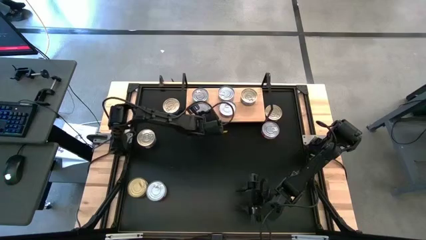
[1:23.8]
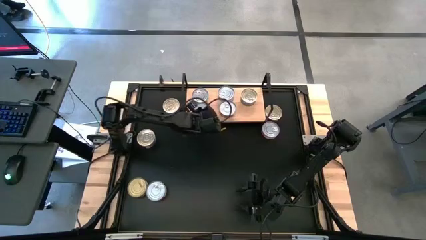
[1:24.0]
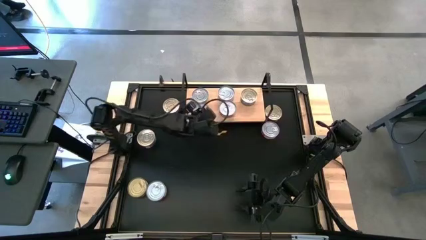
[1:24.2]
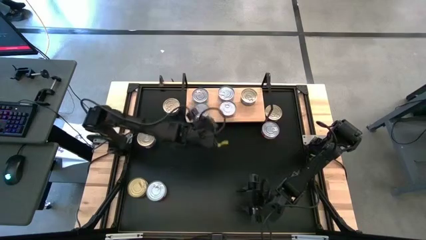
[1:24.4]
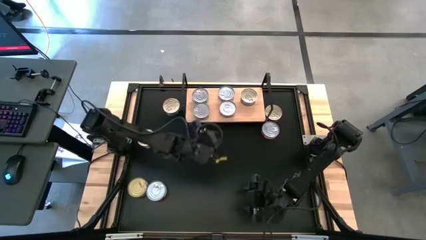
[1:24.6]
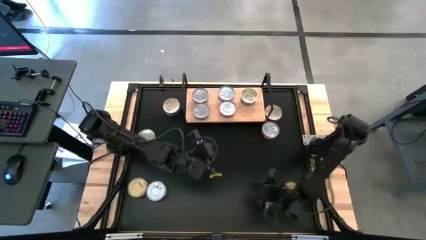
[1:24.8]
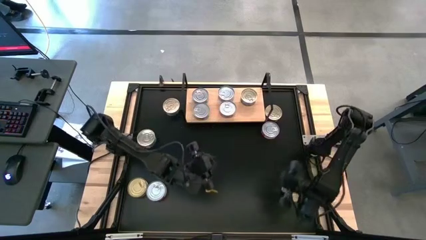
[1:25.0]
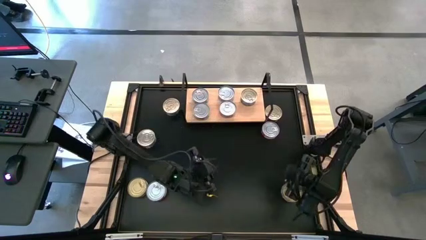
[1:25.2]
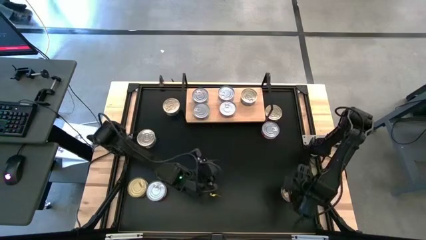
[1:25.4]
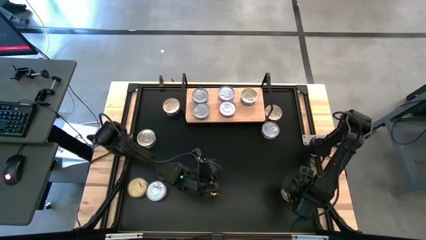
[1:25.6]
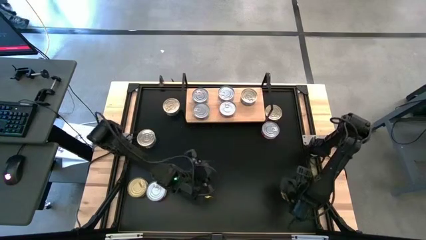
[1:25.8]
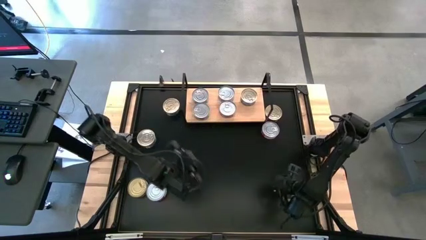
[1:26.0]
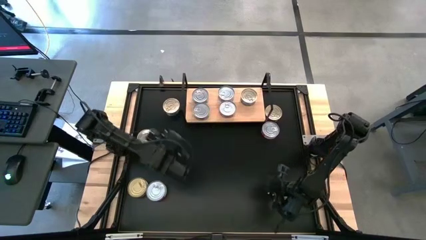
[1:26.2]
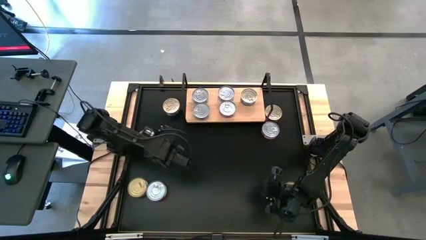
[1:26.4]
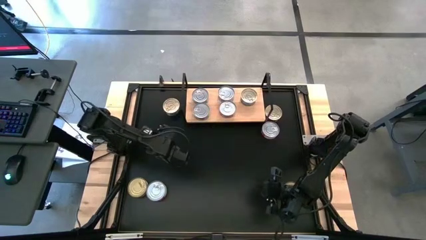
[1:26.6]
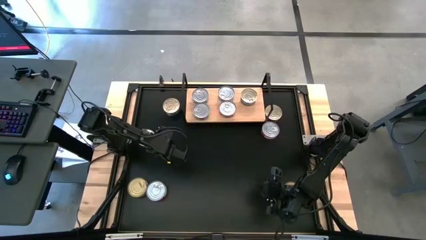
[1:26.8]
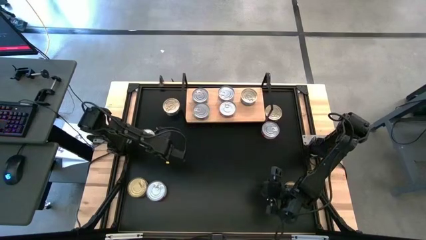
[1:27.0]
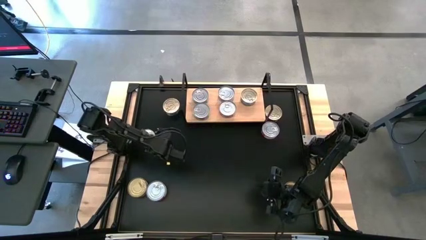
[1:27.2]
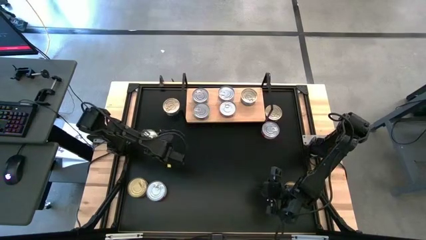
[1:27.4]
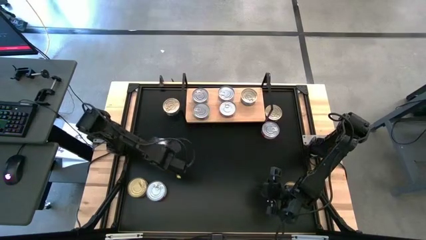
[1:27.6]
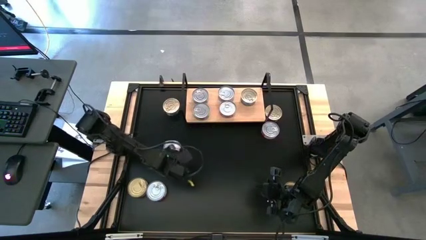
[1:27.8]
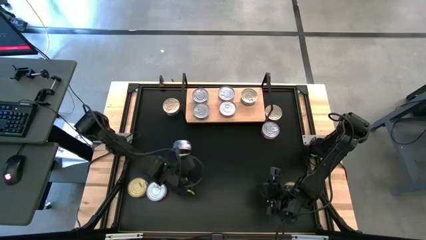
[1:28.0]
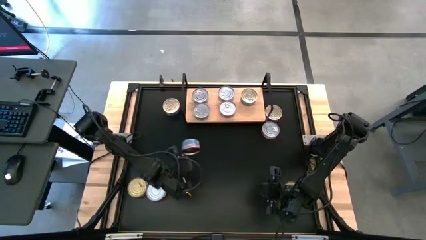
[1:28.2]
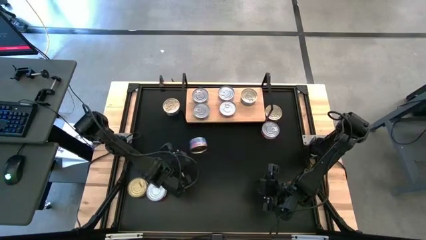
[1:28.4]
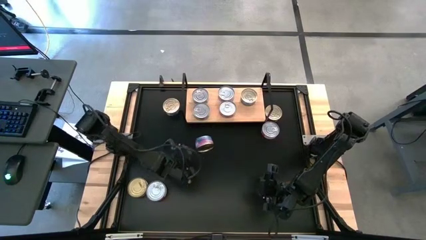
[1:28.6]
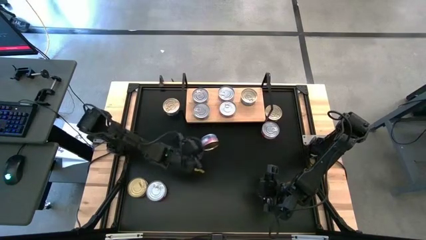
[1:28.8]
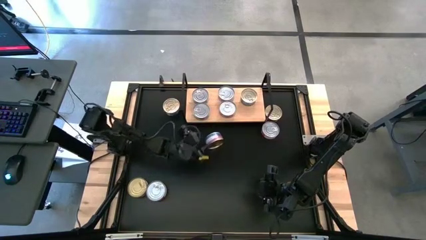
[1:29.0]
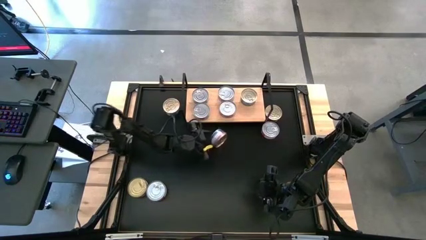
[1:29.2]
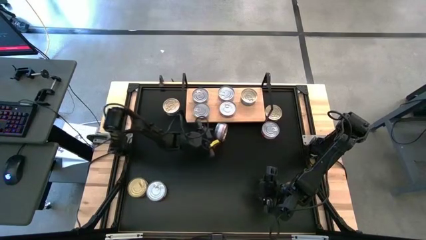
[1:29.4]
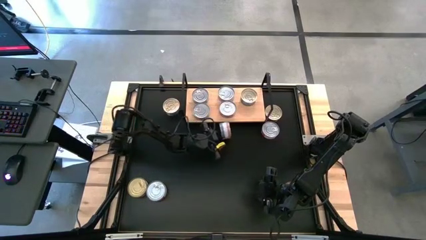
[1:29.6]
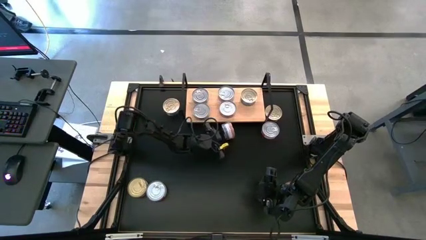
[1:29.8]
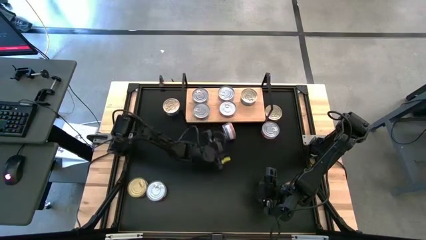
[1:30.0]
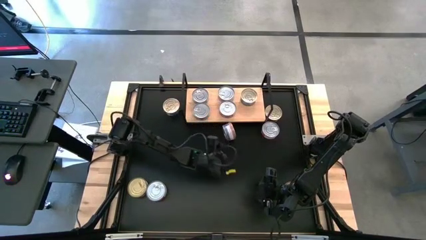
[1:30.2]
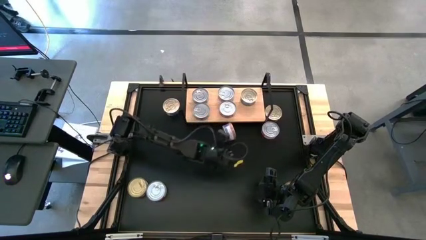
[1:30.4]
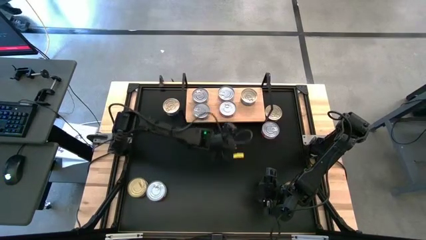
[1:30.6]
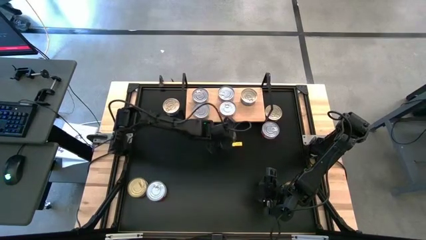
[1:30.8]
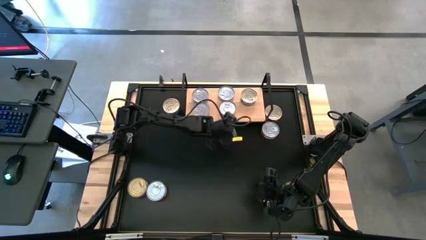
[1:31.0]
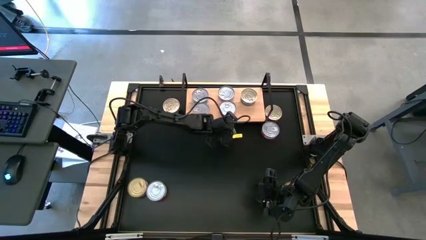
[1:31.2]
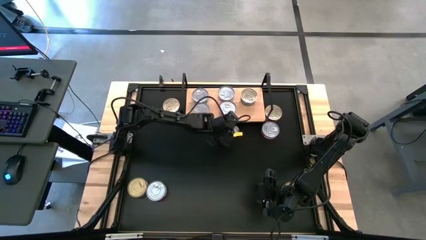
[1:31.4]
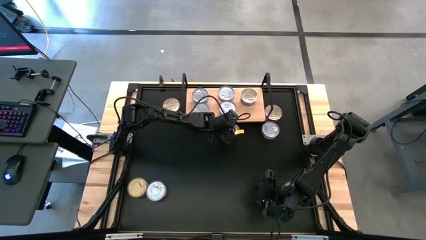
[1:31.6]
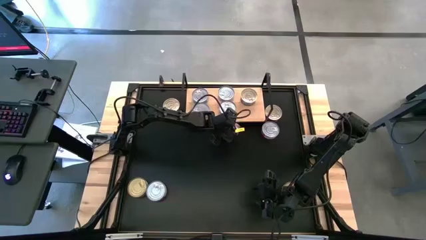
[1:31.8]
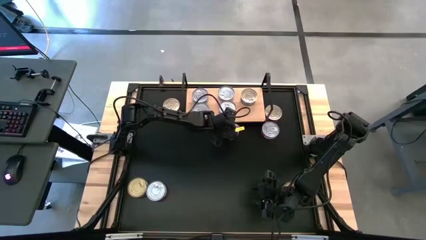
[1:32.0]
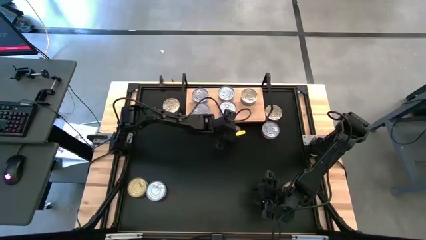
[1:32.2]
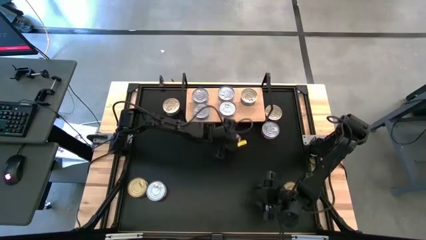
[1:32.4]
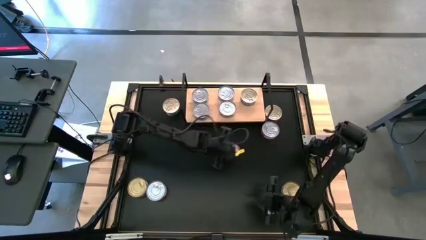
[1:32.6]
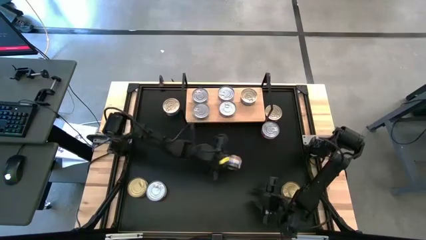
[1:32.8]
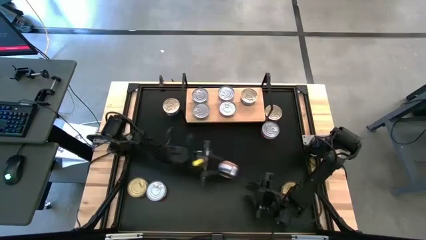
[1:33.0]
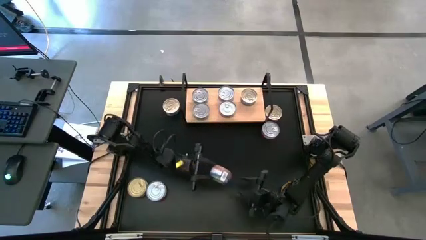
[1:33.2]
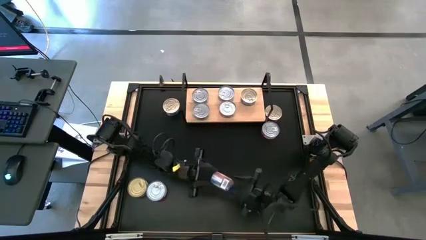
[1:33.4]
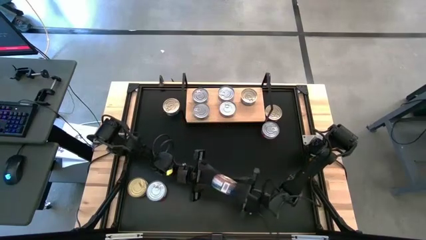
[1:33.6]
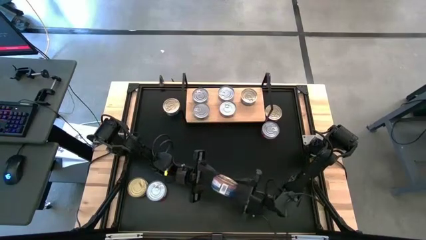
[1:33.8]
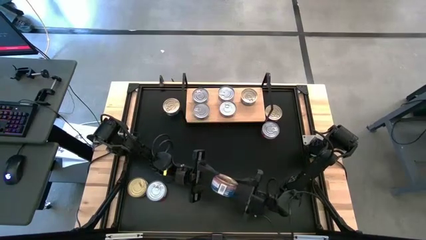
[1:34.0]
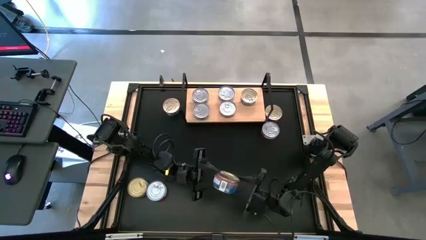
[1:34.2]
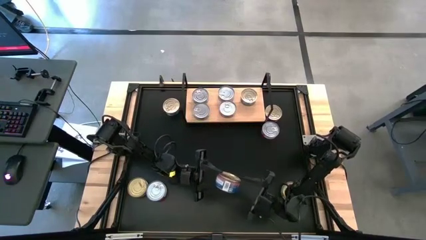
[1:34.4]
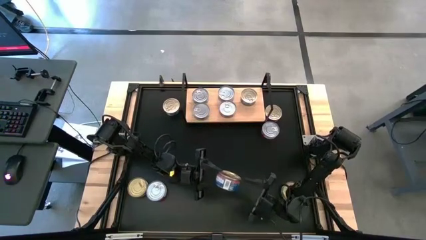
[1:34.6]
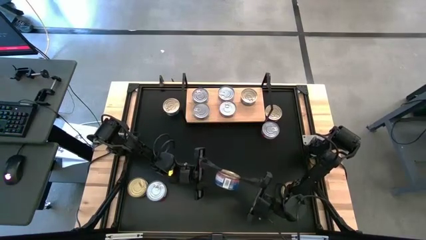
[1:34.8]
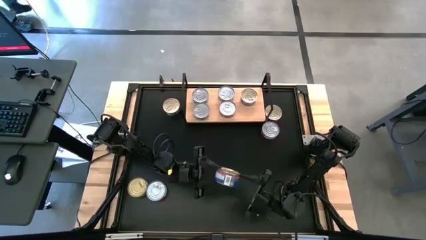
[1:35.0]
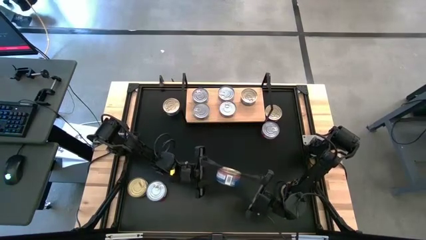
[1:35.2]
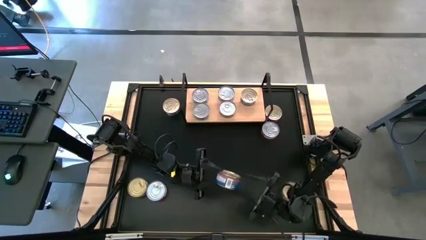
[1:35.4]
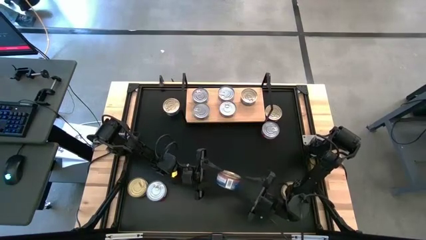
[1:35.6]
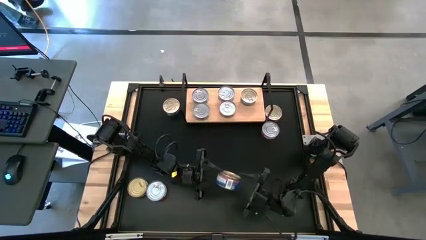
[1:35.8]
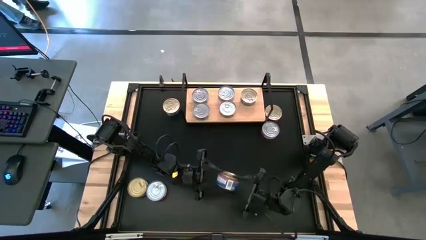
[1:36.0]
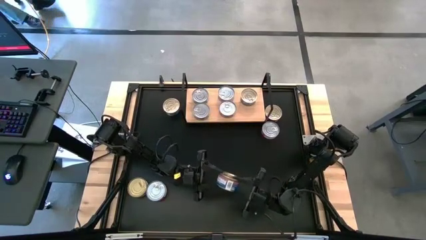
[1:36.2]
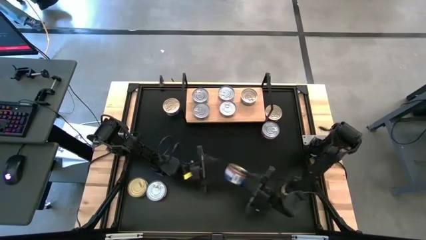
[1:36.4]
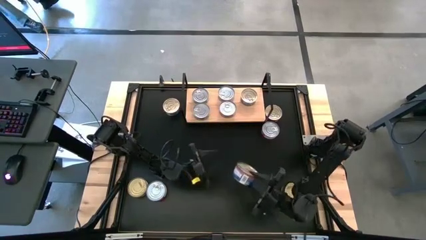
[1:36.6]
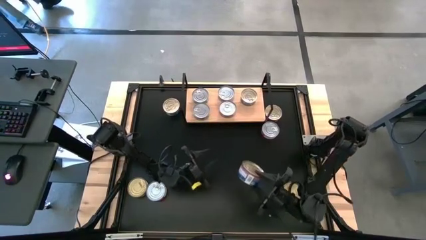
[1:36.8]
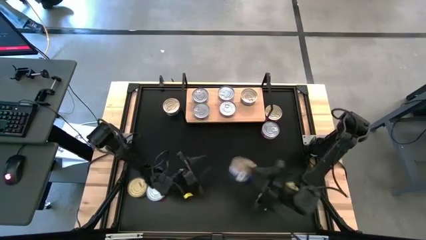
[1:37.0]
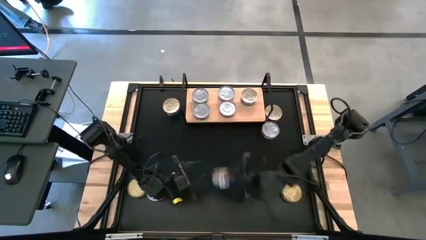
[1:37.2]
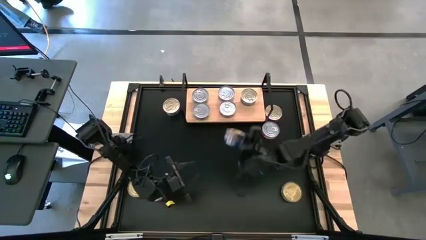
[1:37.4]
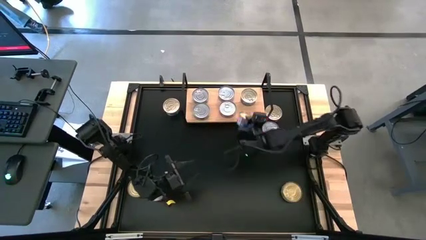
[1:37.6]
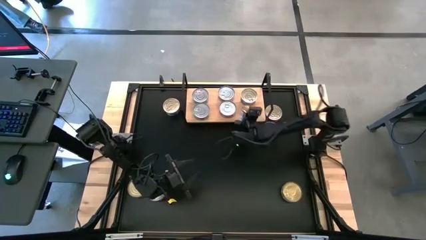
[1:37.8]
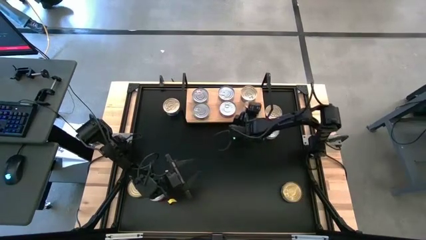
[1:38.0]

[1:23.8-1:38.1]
Task: Stack canned seafood by type on shelf
Put the blue tuna can on the shelf aligned with the other blue tuna can
